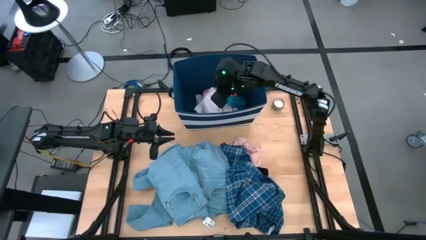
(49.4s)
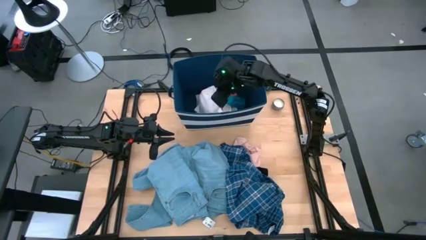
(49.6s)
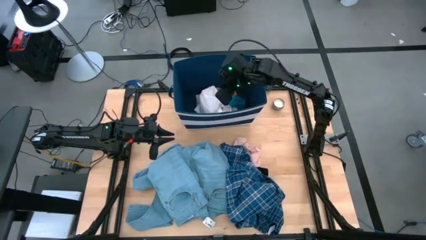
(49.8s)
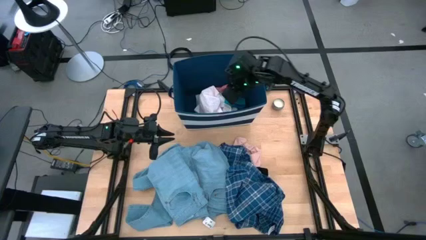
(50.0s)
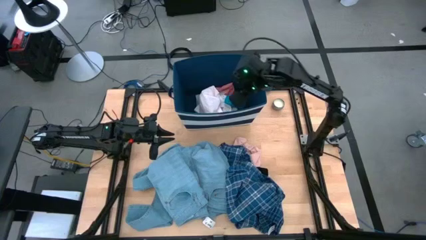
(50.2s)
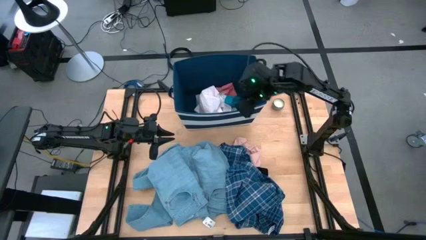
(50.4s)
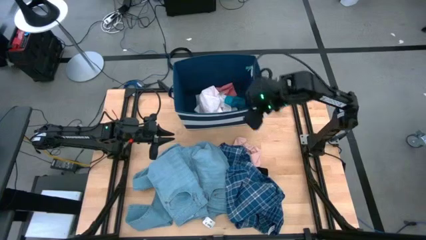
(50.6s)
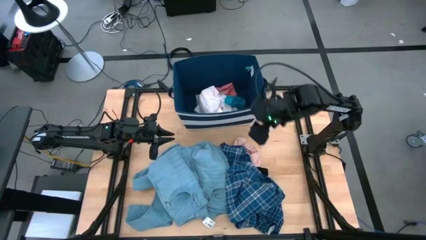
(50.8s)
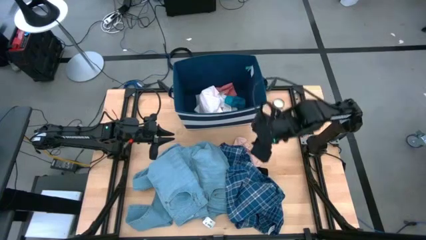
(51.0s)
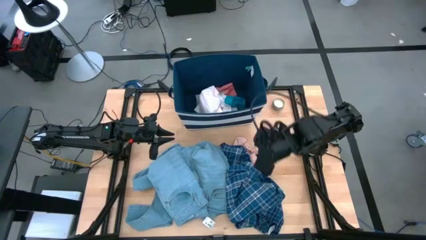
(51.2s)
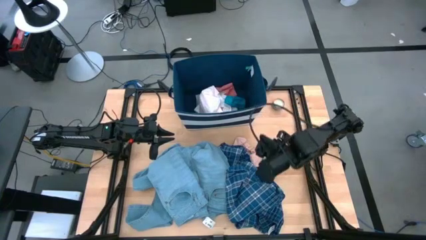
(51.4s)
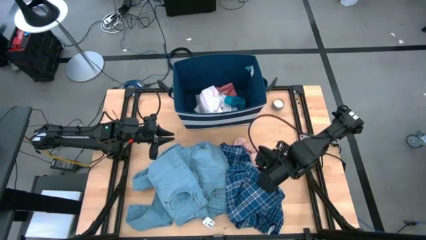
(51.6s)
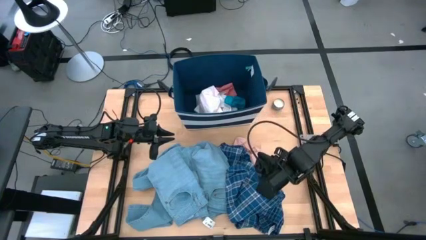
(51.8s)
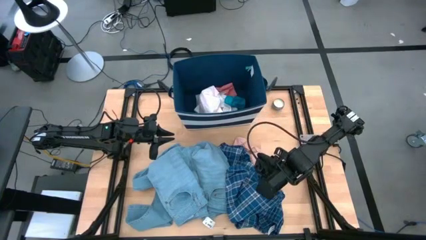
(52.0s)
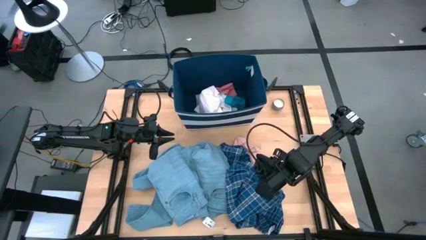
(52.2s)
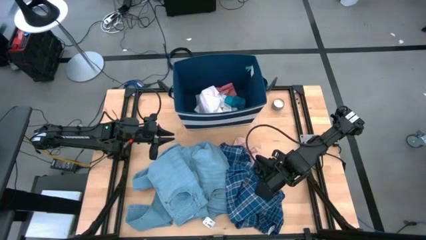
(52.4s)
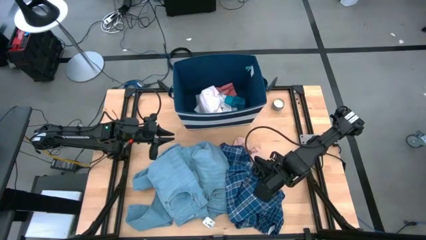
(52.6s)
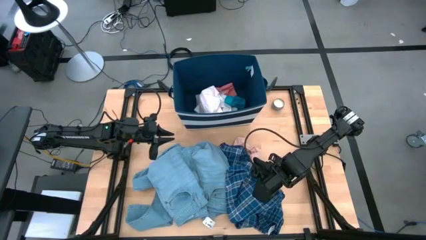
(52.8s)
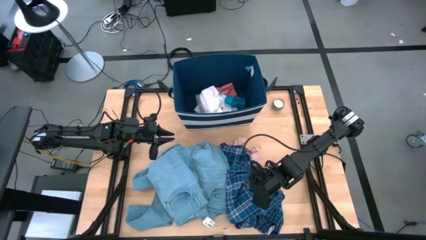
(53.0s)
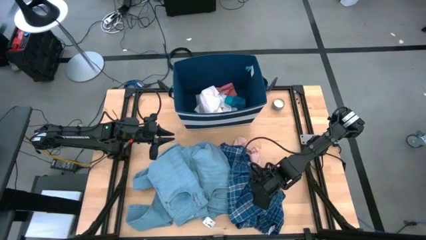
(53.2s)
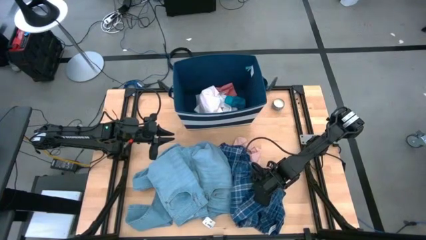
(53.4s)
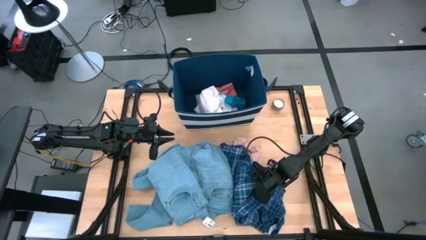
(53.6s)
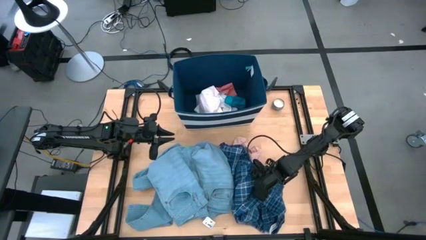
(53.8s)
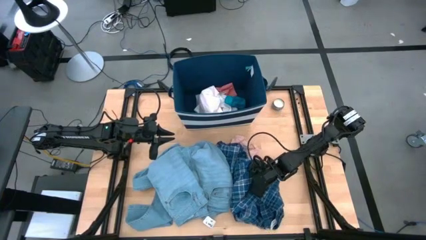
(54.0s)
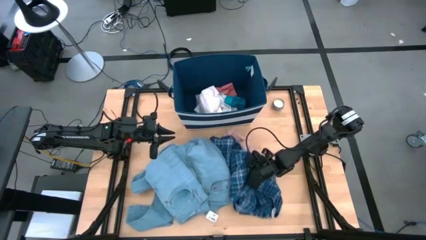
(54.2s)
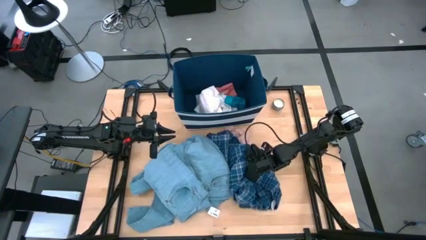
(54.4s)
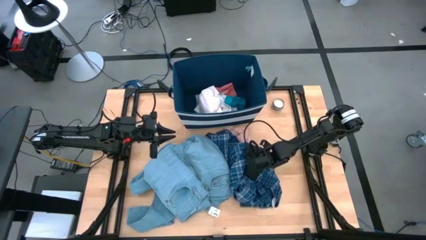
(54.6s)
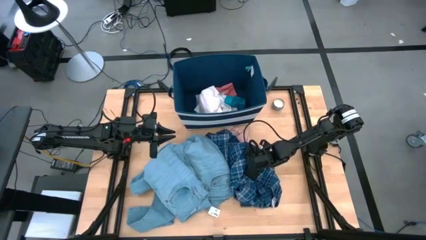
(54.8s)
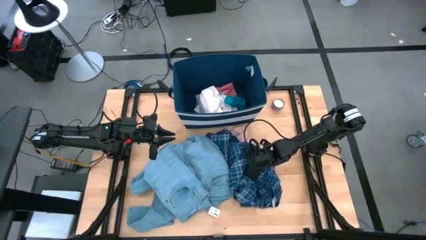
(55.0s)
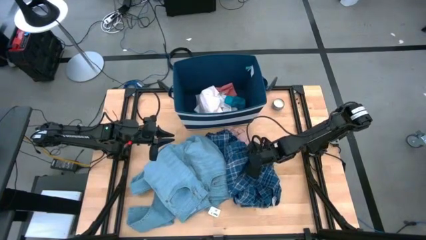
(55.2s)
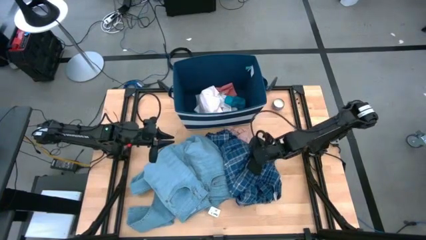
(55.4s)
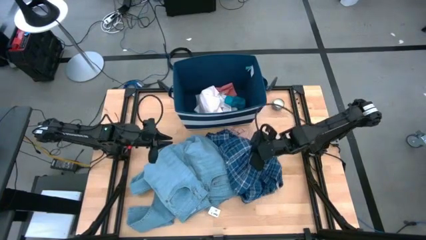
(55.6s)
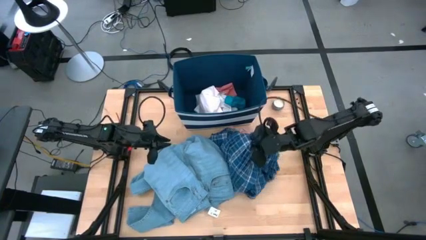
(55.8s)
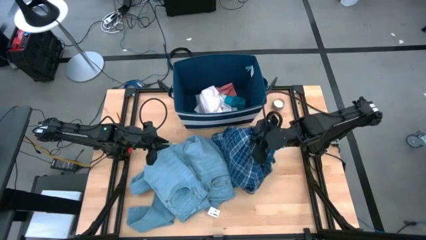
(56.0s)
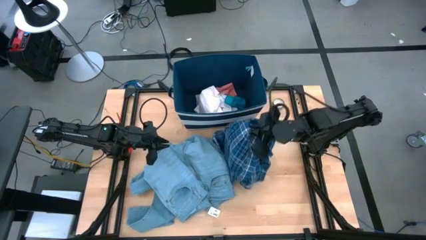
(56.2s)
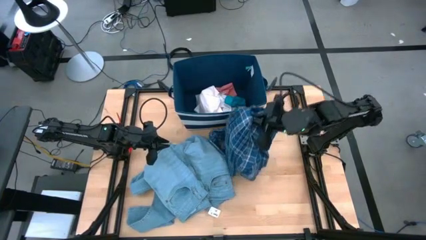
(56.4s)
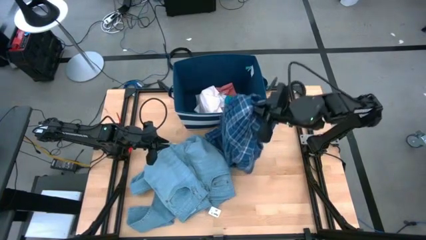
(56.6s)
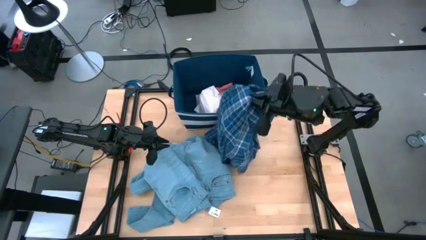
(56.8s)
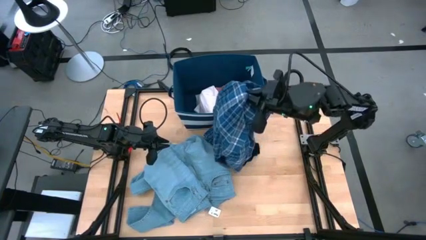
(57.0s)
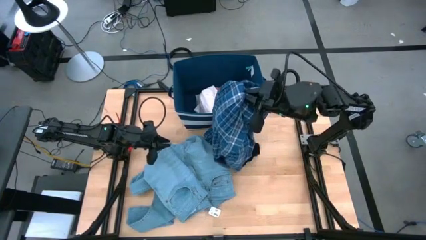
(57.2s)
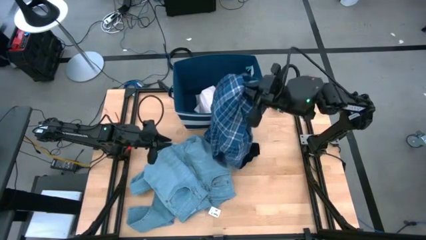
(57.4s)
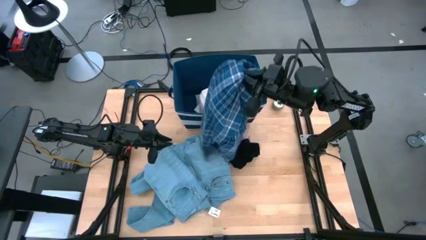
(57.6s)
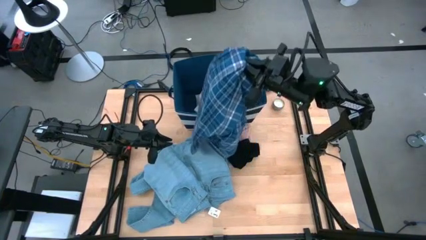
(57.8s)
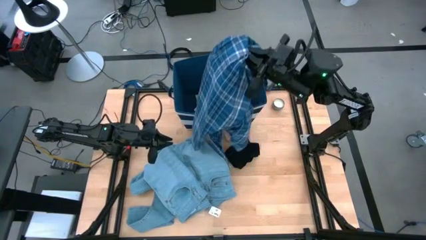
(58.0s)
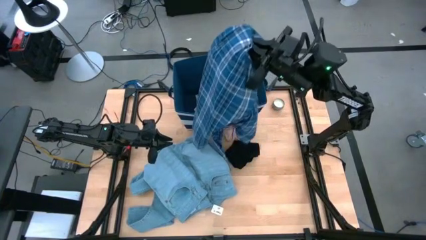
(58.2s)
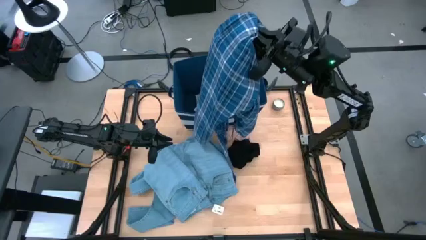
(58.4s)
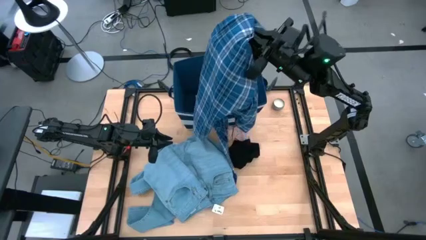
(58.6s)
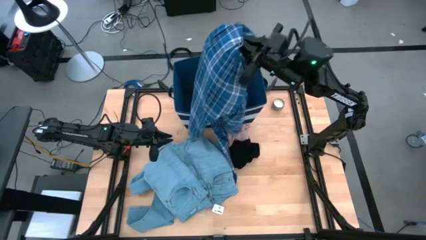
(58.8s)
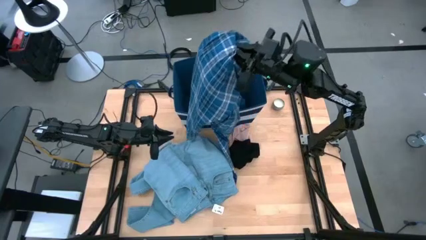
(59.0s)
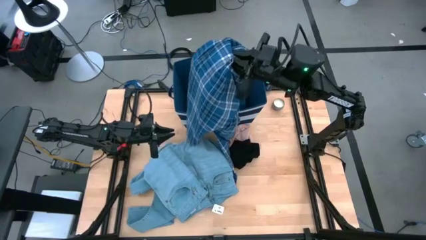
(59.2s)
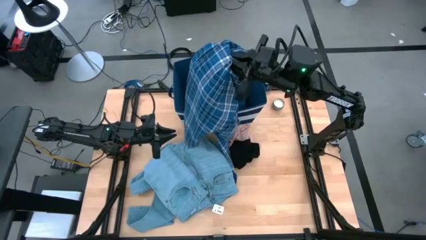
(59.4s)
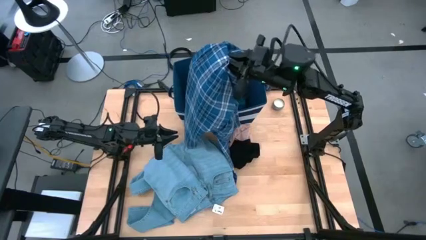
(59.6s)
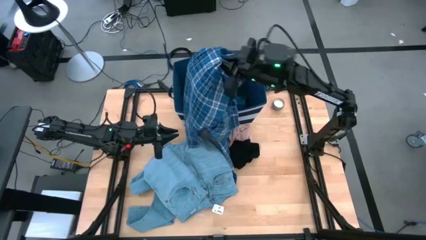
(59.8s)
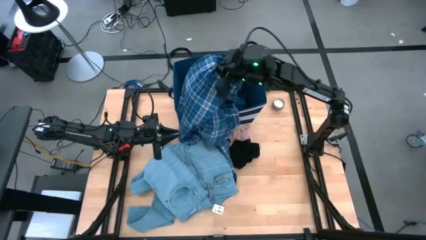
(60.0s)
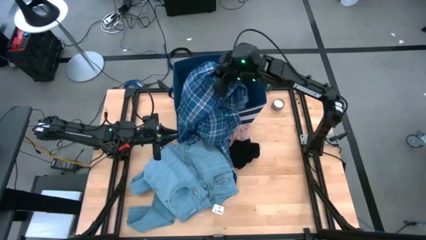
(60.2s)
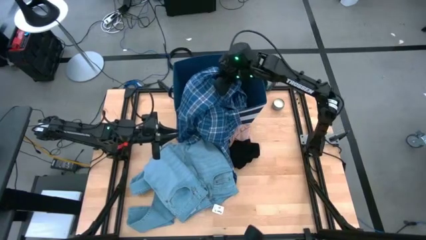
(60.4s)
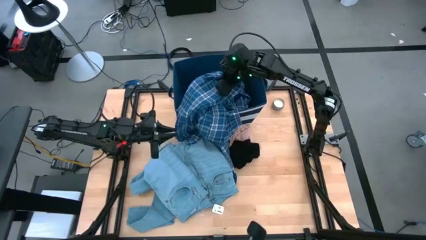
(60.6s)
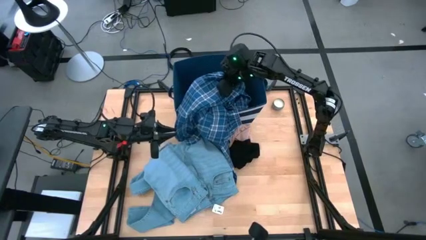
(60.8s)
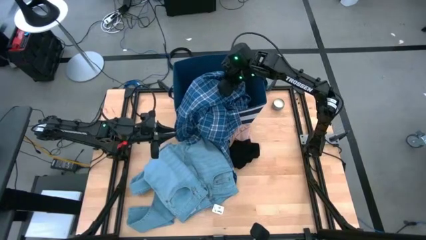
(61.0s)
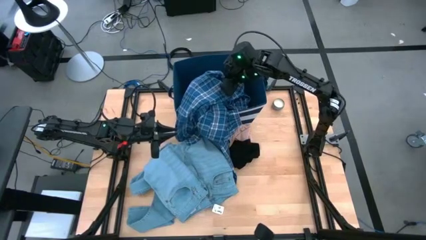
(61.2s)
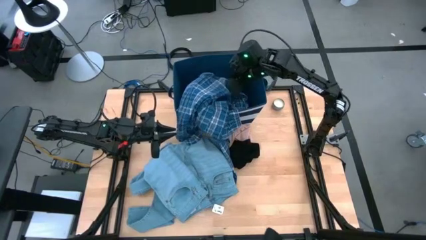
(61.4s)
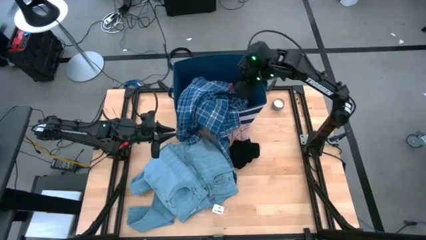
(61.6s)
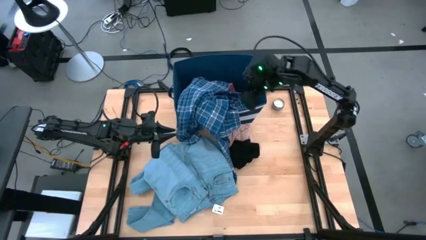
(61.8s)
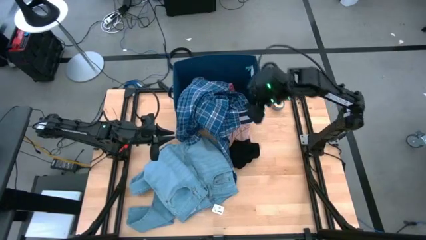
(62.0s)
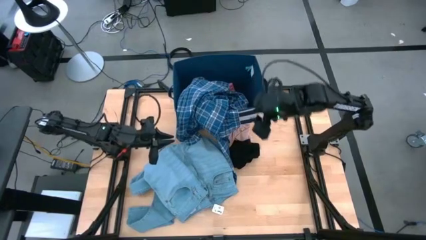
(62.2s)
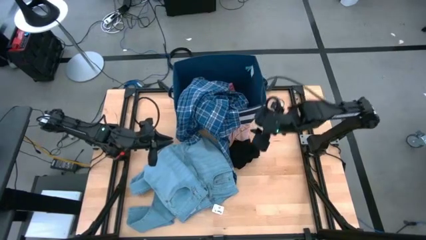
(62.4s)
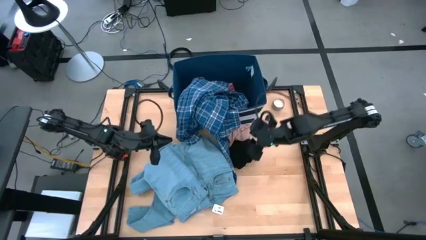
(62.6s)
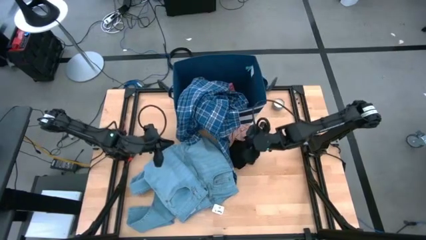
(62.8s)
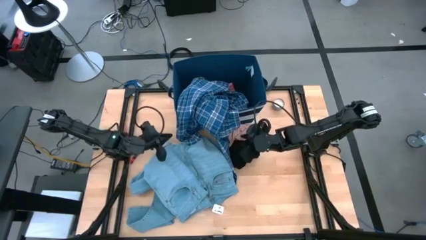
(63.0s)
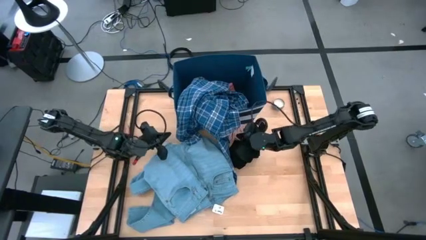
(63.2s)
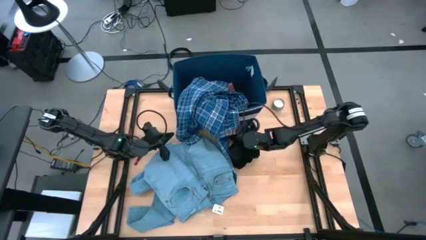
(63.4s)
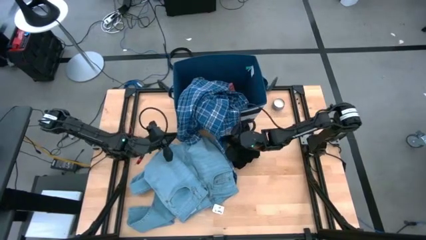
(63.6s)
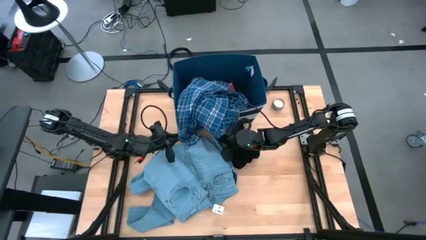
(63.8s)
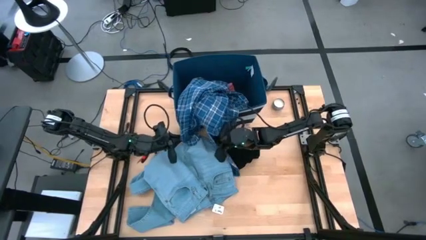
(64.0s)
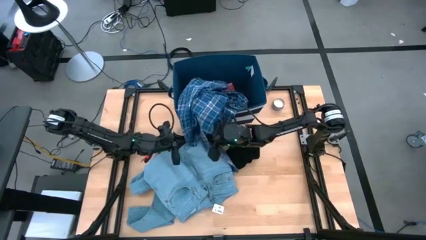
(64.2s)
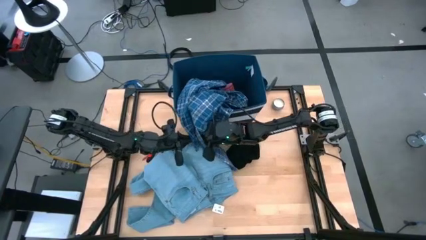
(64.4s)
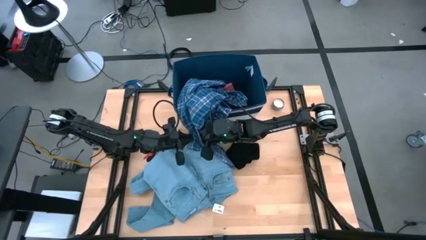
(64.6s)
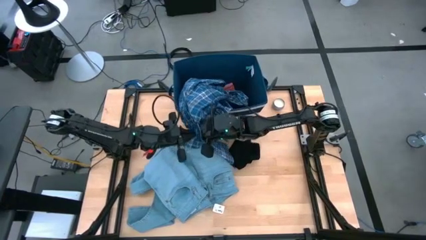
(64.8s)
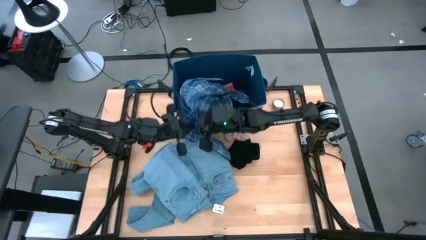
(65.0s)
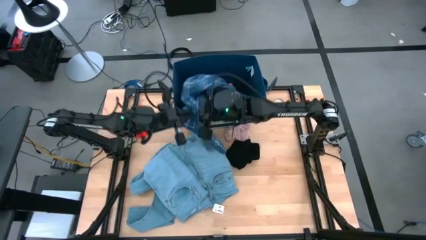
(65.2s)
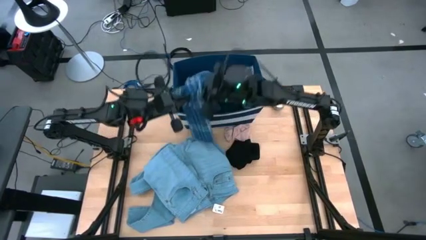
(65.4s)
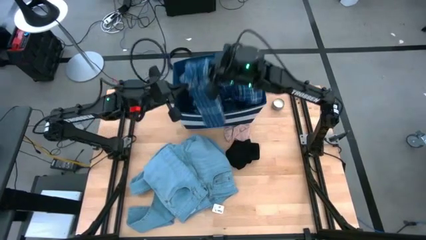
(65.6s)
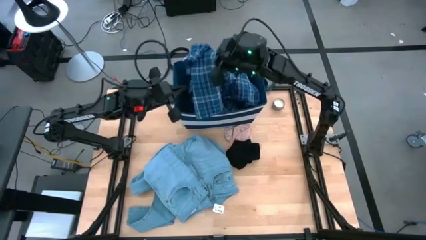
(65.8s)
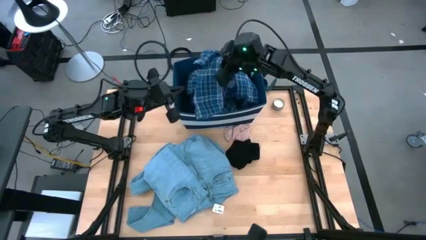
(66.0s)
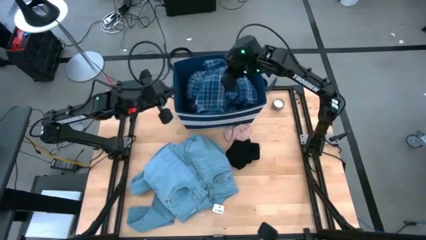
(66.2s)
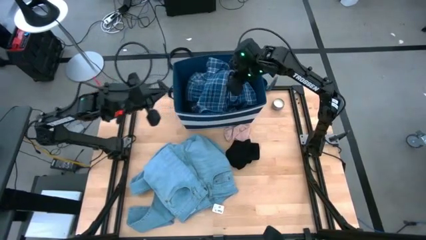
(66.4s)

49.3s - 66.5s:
Task: Sort clothes
Put the blue checkered shirt into the blue organizer bin
